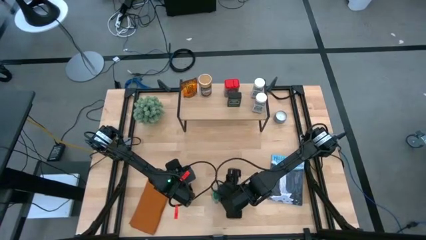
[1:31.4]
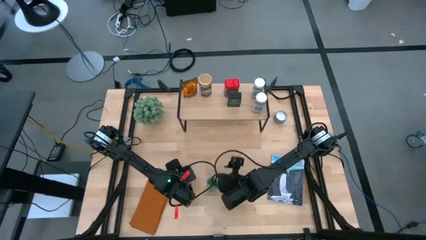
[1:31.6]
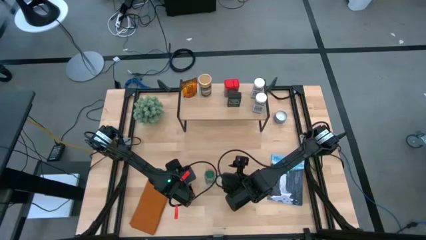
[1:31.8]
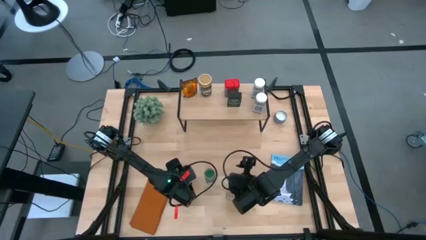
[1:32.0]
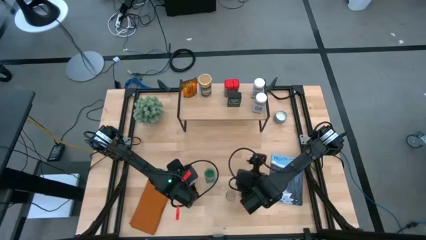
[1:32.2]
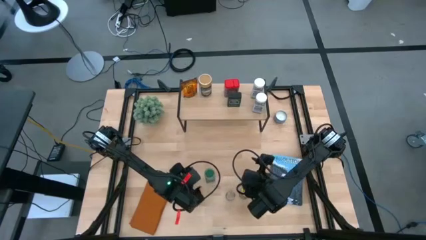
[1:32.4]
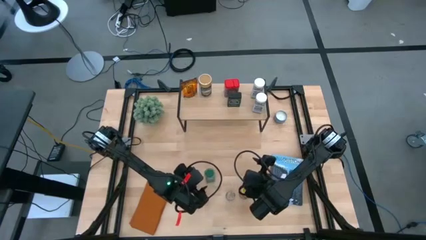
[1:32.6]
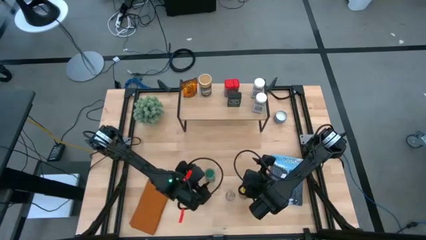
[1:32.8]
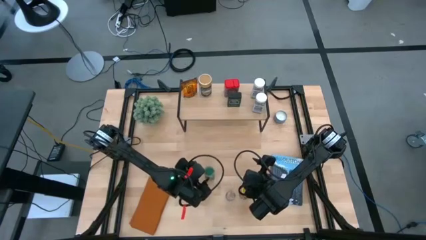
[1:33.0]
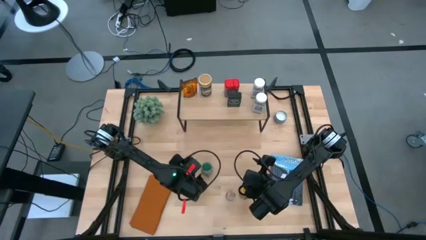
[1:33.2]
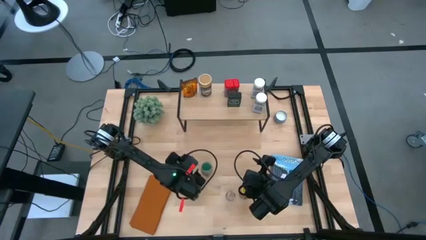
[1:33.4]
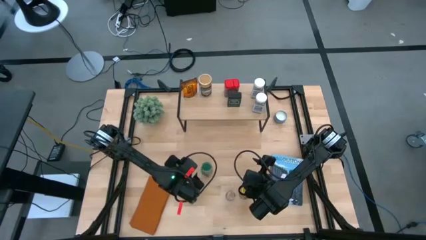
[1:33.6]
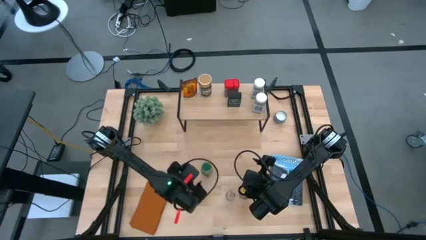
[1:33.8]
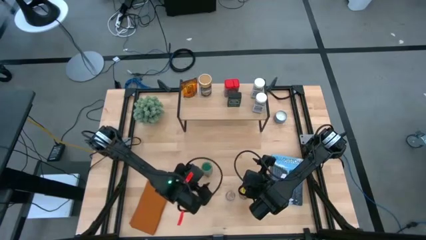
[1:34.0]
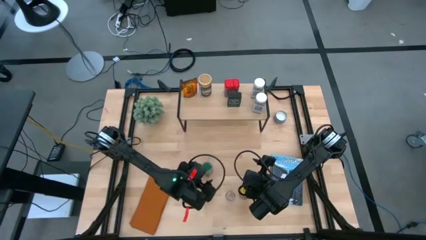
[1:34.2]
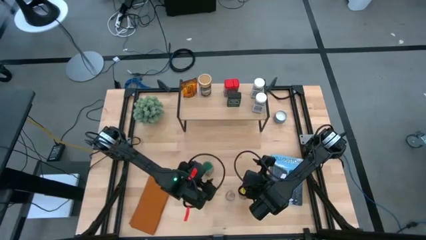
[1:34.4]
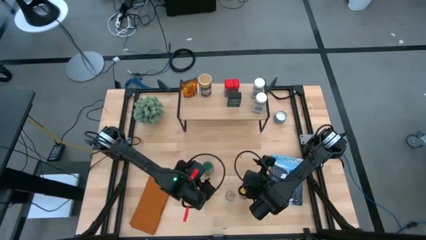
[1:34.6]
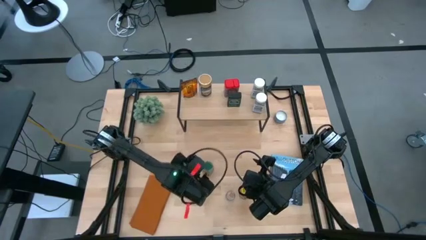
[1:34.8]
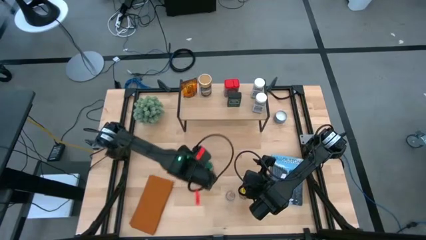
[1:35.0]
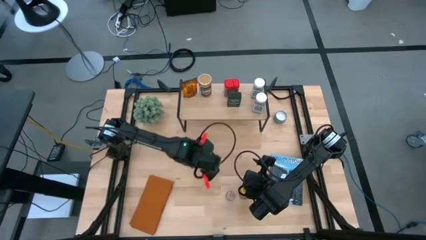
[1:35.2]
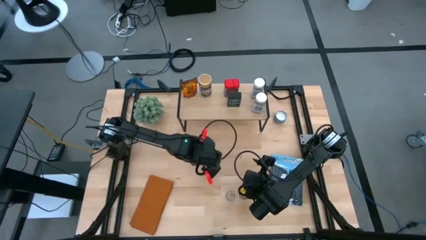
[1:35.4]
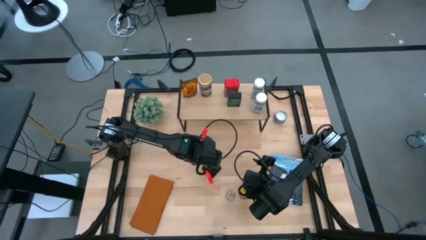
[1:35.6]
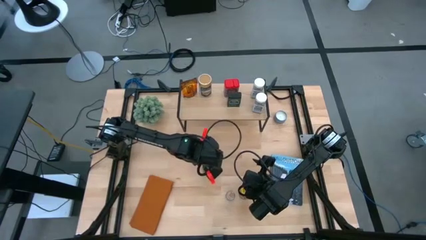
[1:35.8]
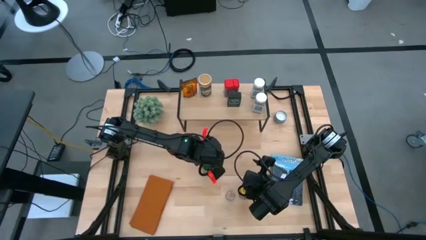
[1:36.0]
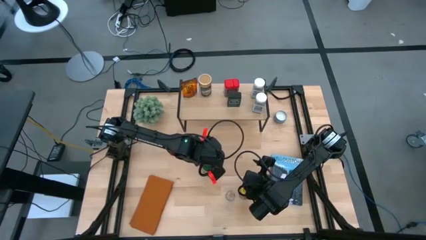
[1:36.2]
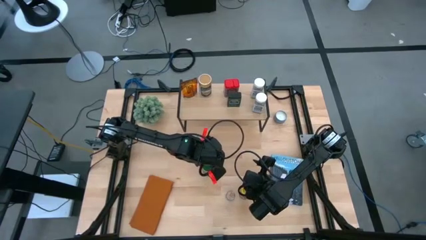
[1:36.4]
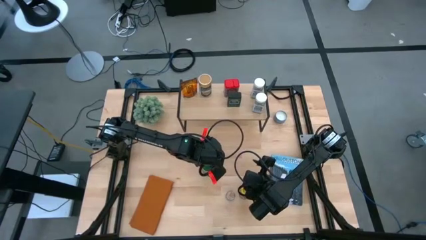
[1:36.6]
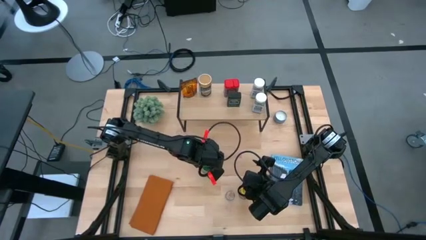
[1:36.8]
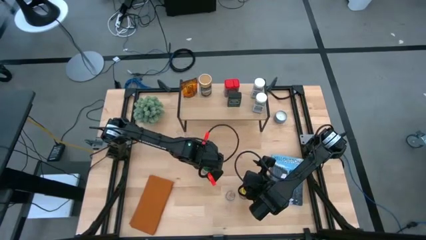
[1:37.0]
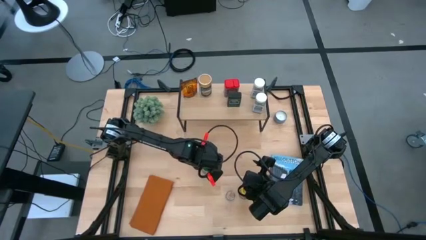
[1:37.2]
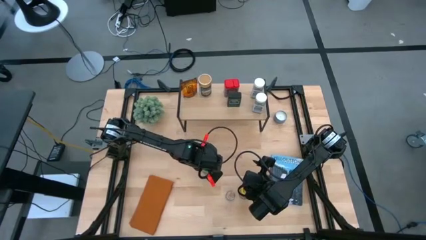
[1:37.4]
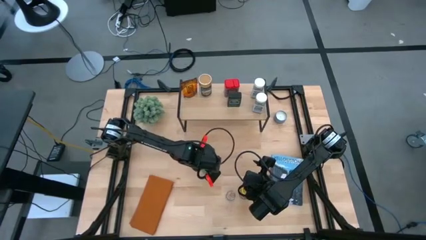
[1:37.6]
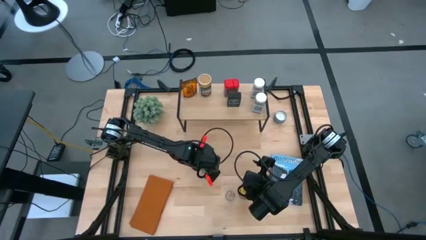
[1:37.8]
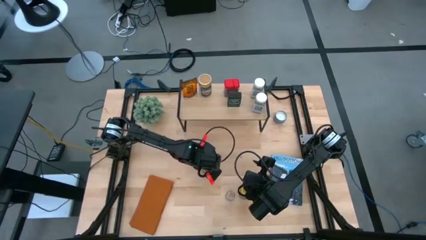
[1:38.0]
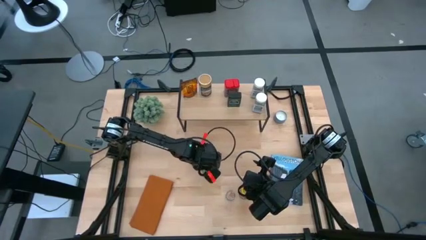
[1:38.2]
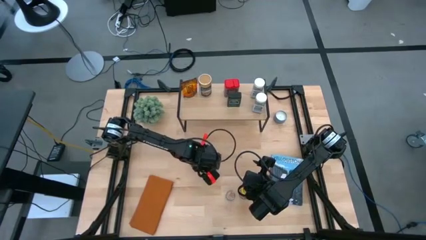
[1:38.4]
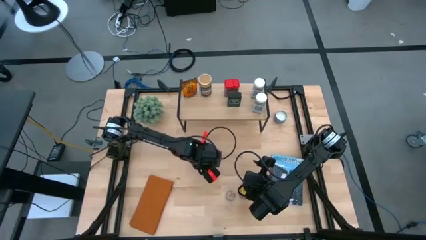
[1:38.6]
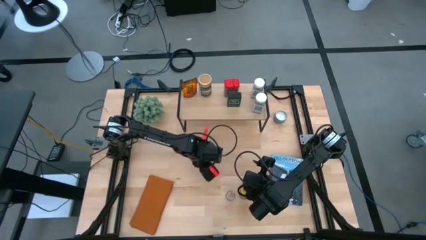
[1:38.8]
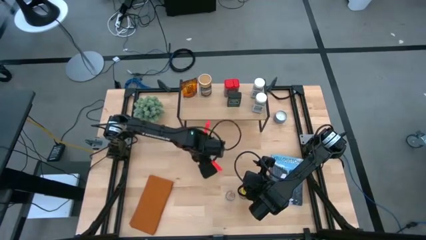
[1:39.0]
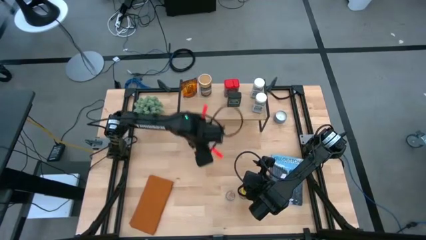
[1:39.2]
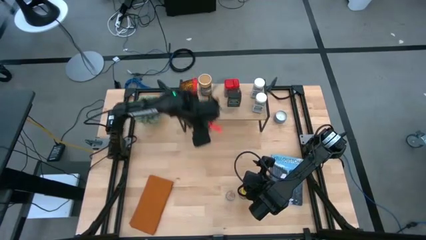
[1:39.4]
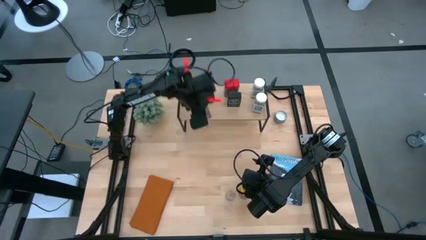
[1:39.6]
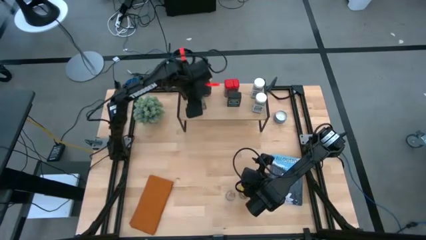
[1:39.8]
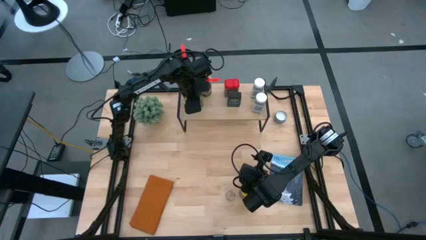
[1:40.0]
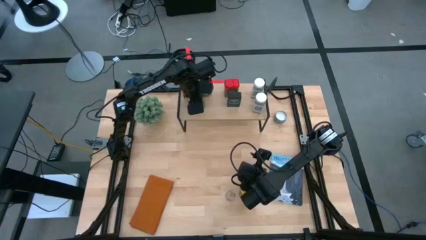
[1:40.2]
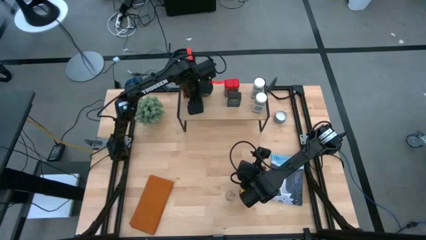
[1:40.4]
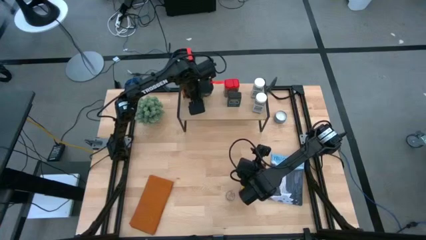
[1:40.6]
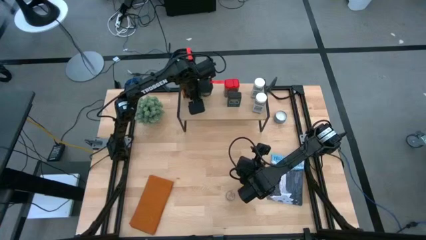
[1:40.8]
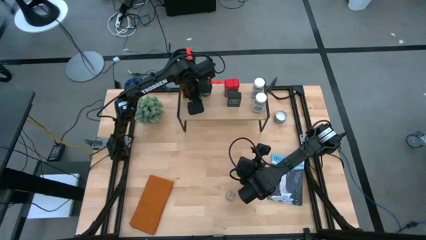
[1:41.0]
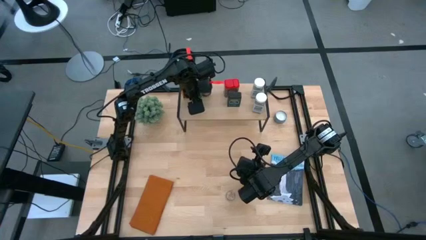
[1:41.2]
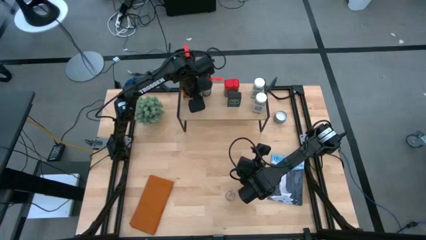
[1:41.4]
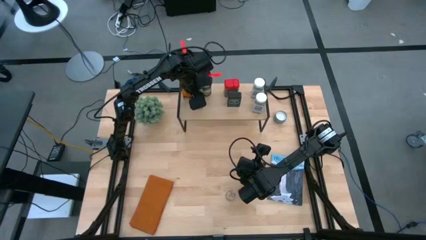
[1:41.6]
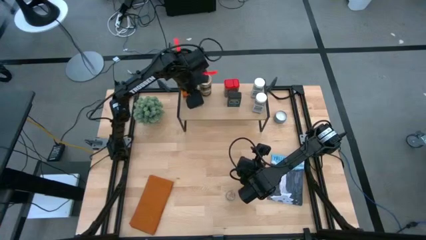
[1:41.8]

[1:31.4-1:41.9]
Task: Shelf spices
Put the green seasoning bottle on the shelf
